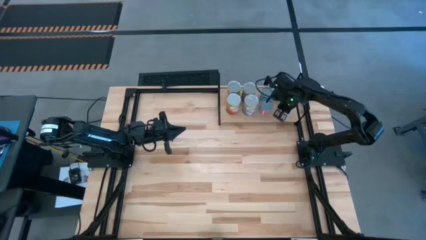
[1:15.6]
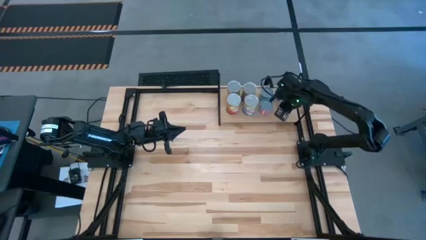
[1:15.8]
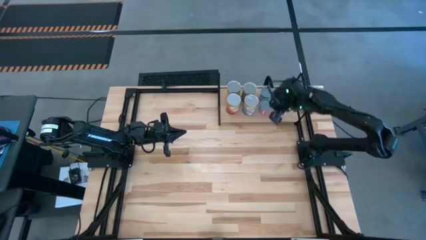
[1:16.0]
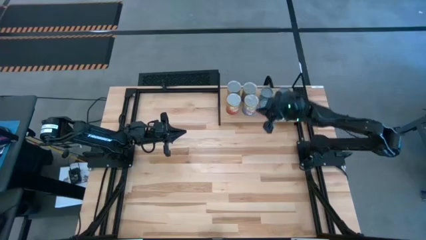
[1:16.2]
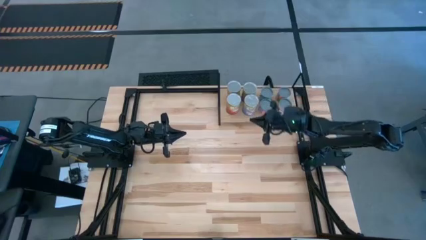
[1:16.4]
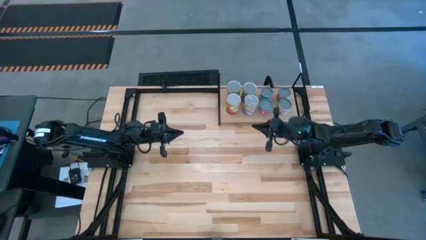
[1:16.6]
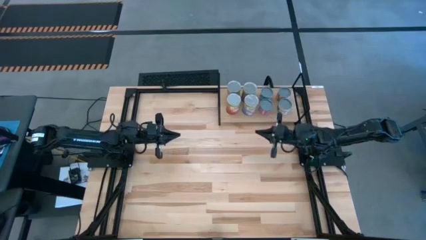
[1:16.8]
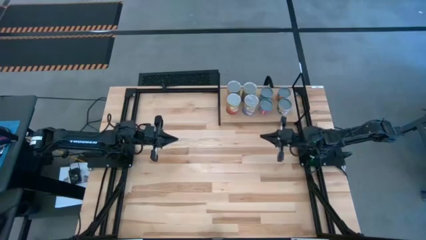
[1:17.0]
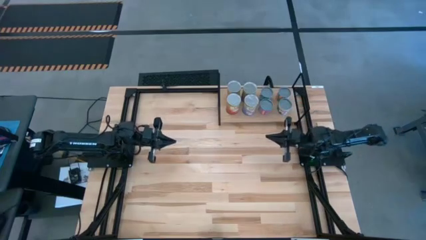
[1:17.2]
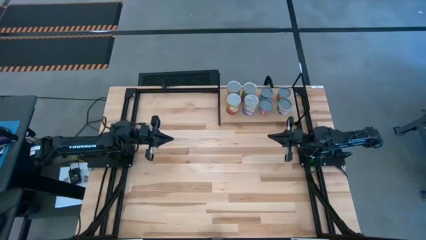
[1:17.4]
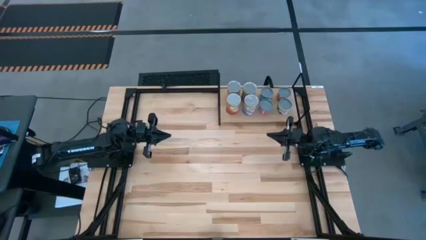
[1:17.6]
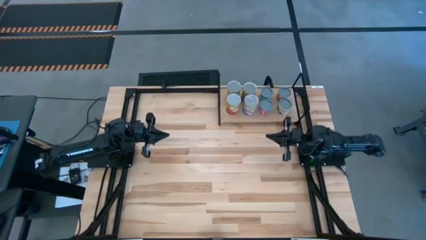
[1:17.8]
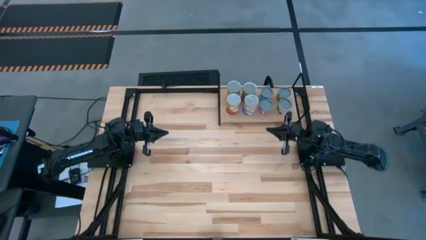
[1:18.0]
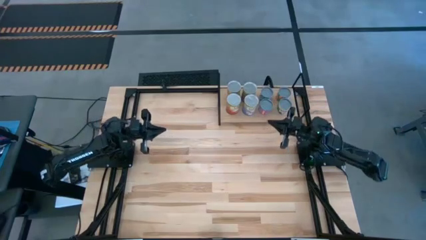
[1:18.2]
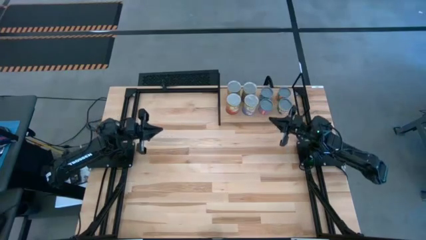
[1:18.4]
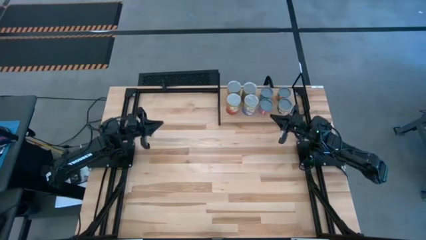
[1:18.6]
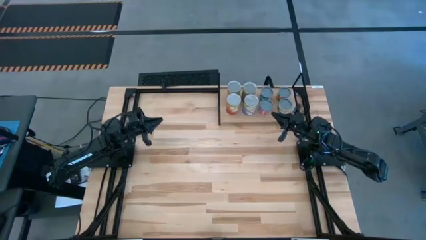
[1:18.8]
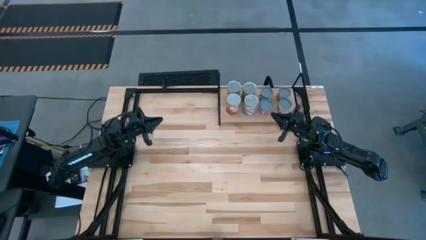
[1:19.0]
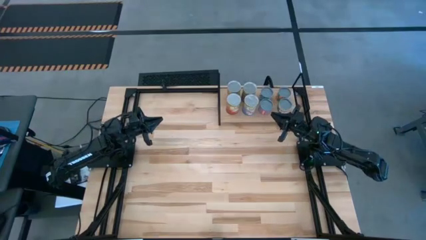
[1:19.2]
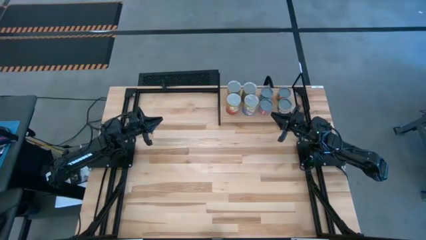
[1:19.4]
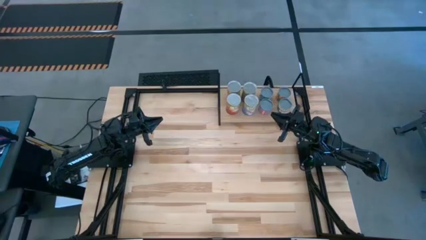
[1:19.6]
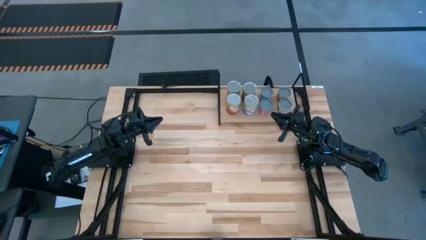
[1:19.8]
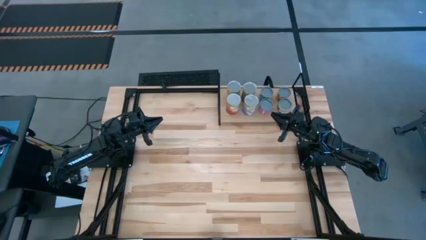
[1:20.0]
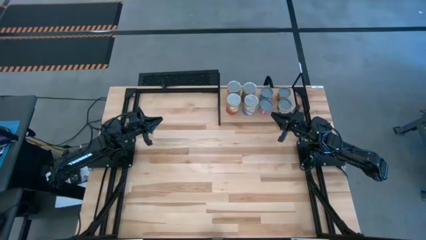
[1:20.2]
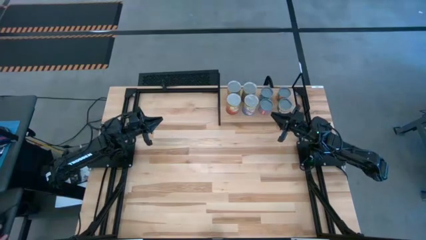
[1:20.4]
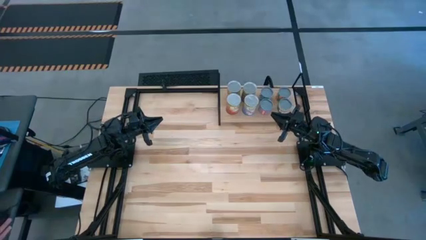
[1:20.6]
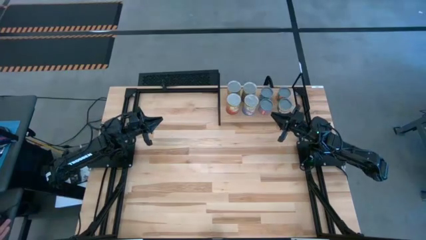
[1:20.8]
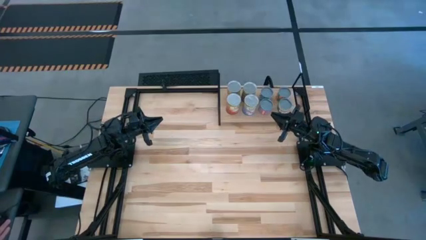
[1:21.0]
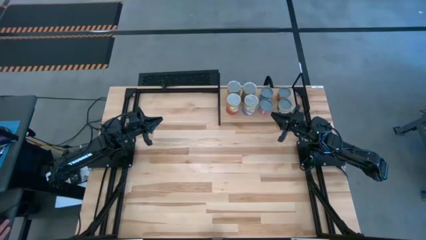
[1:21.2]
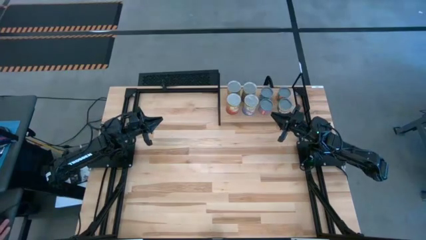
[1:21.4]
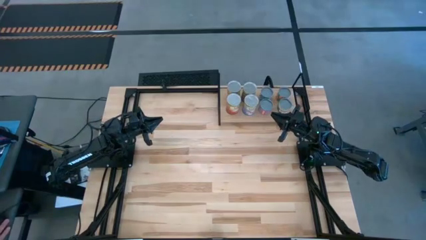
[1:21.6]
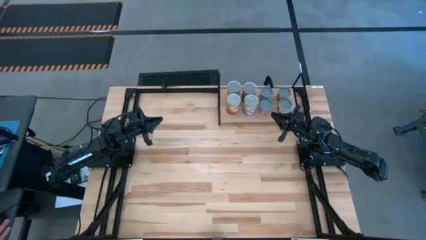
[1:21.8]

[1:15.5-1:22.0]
Task: Pick and place cans onto a shelf
Return to Home Position

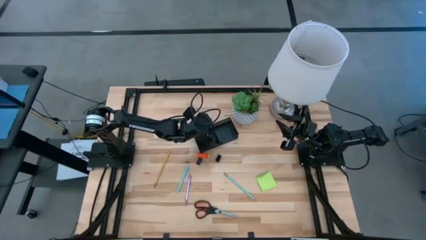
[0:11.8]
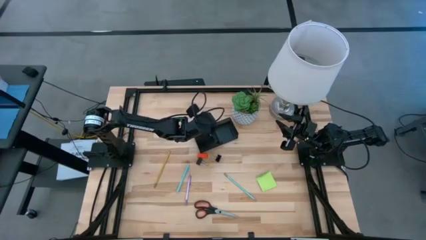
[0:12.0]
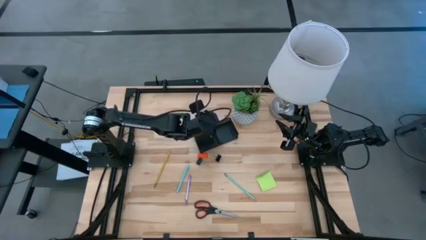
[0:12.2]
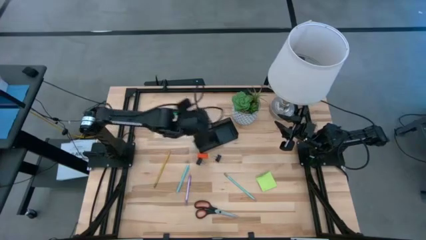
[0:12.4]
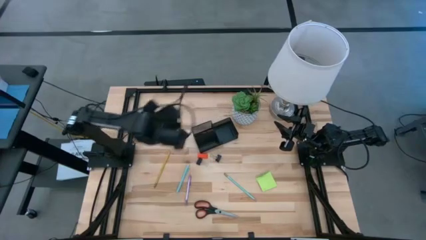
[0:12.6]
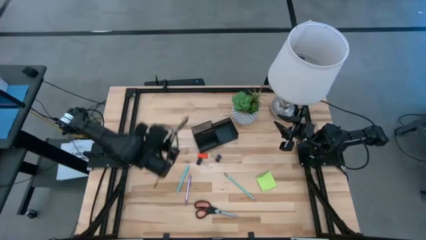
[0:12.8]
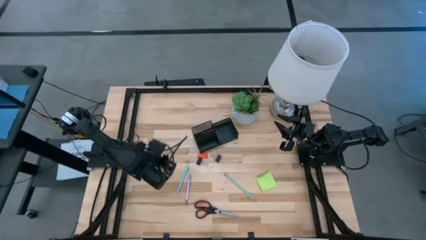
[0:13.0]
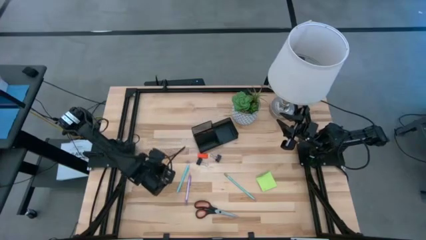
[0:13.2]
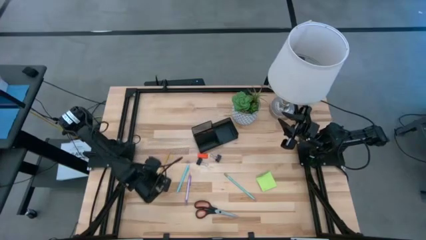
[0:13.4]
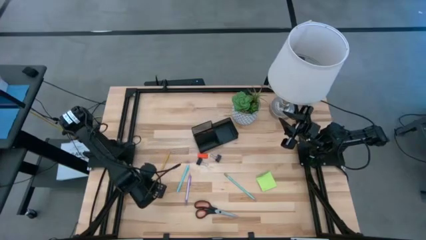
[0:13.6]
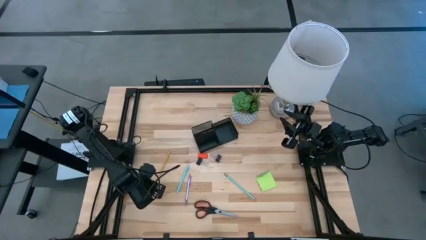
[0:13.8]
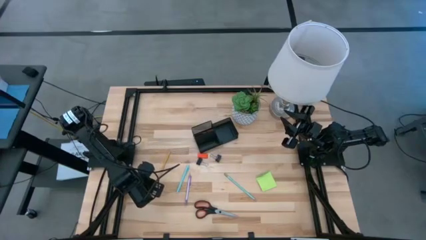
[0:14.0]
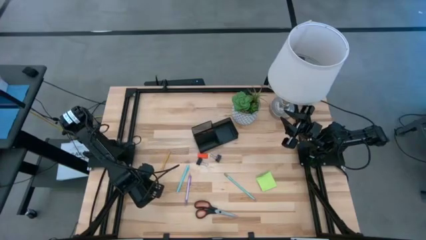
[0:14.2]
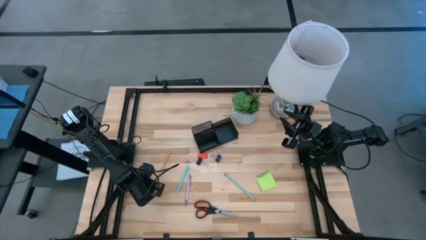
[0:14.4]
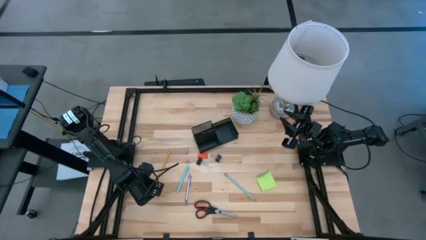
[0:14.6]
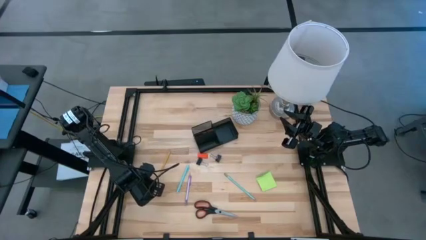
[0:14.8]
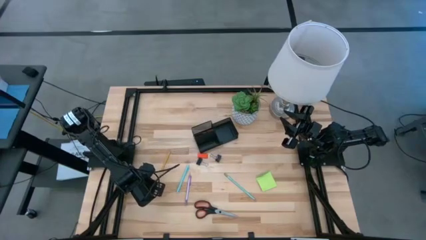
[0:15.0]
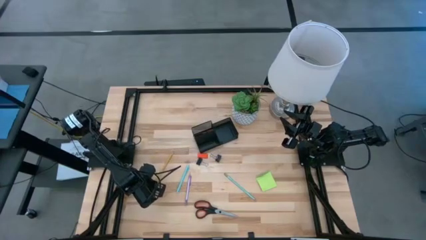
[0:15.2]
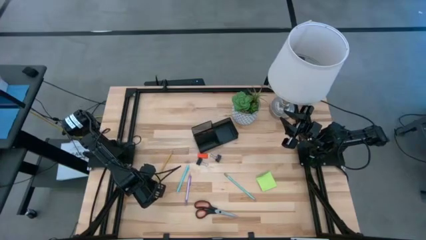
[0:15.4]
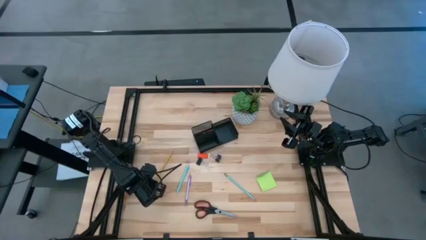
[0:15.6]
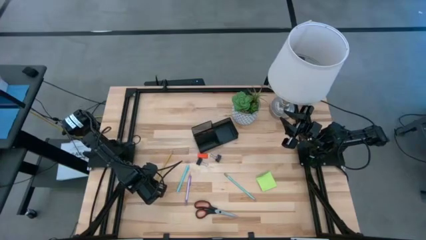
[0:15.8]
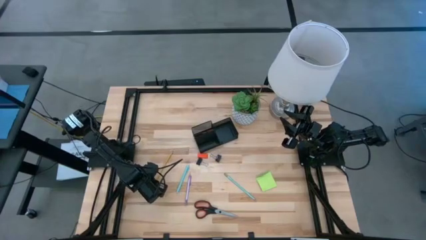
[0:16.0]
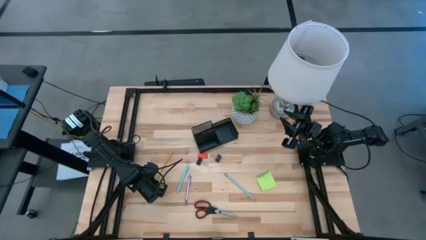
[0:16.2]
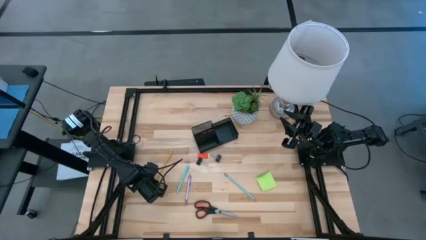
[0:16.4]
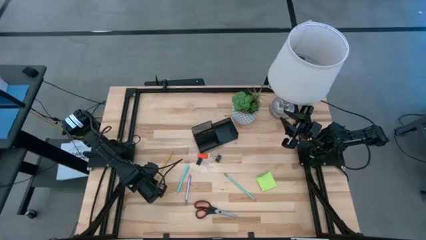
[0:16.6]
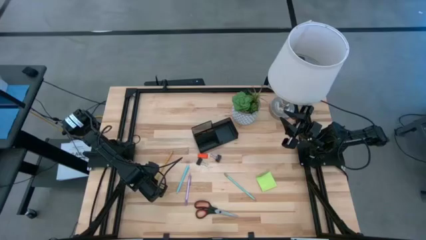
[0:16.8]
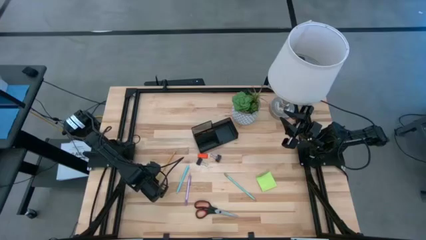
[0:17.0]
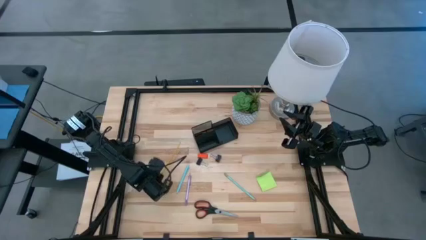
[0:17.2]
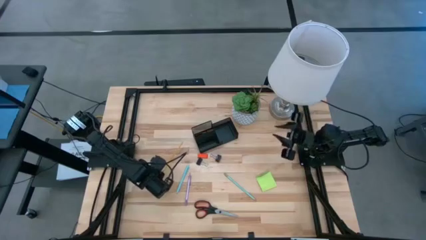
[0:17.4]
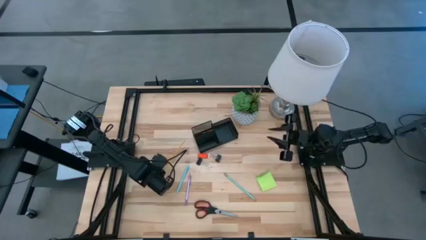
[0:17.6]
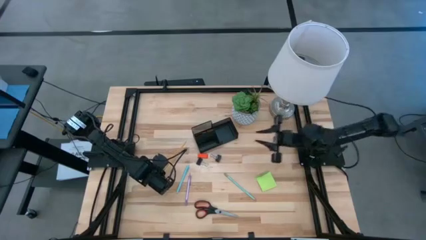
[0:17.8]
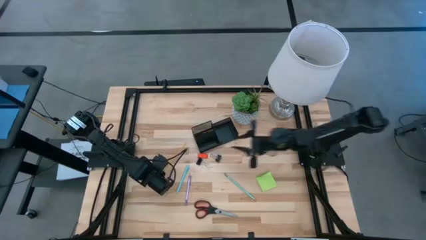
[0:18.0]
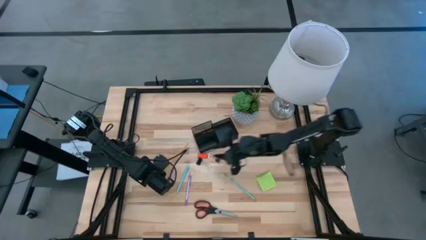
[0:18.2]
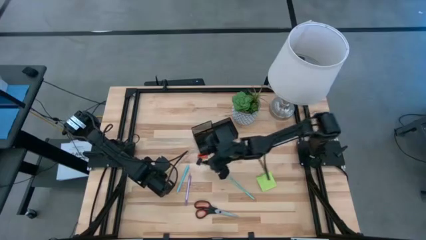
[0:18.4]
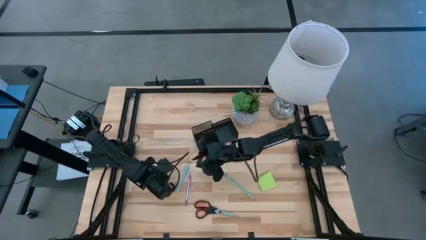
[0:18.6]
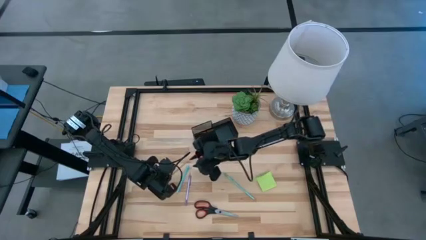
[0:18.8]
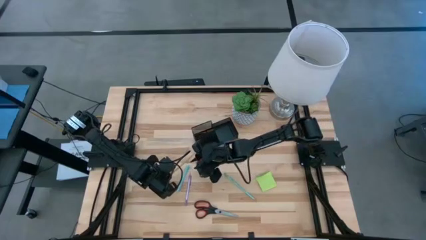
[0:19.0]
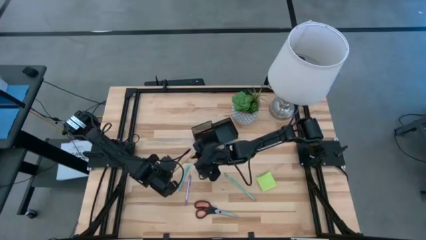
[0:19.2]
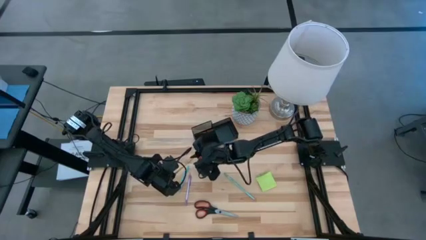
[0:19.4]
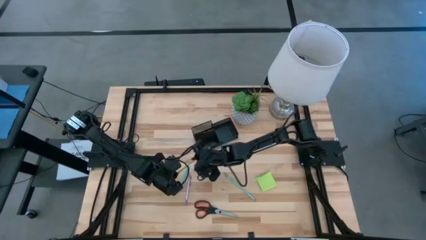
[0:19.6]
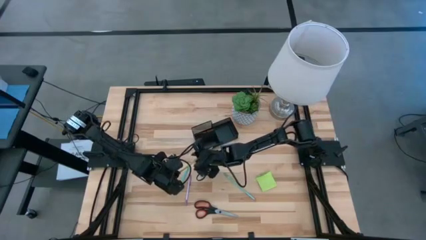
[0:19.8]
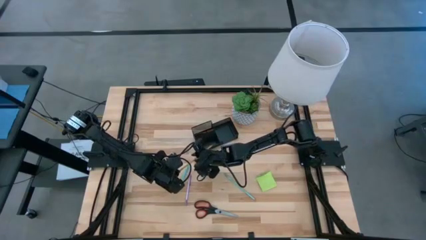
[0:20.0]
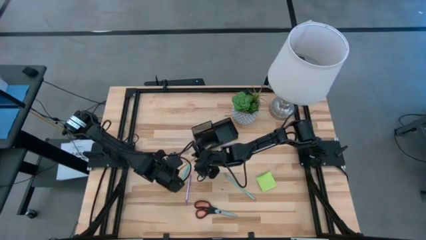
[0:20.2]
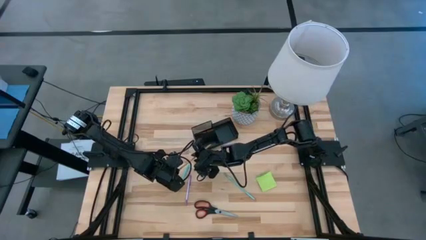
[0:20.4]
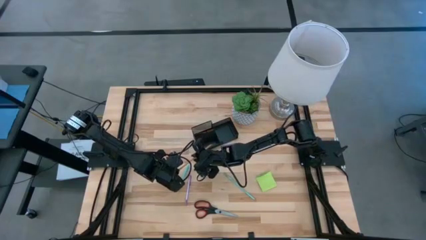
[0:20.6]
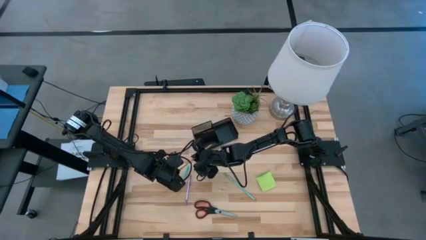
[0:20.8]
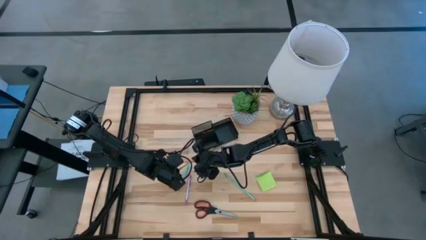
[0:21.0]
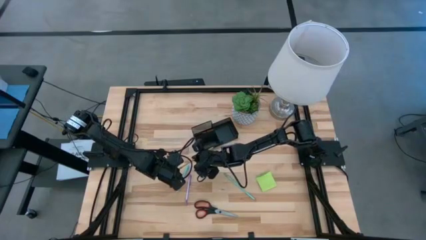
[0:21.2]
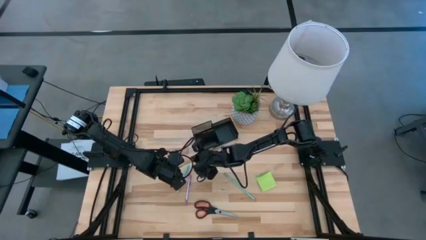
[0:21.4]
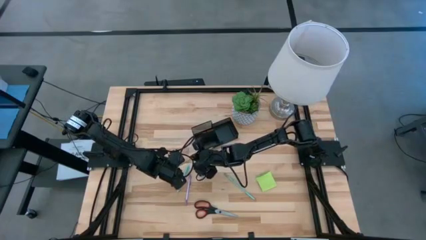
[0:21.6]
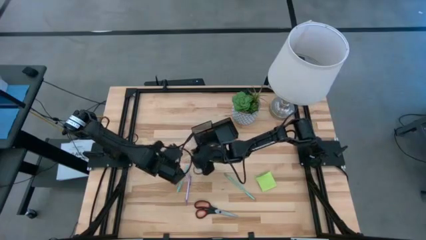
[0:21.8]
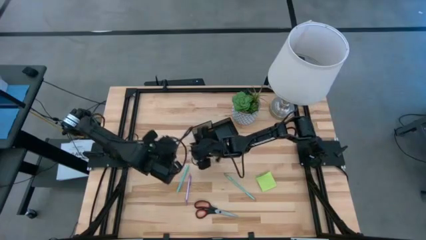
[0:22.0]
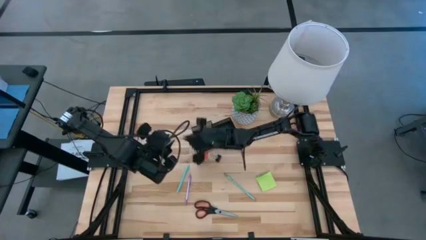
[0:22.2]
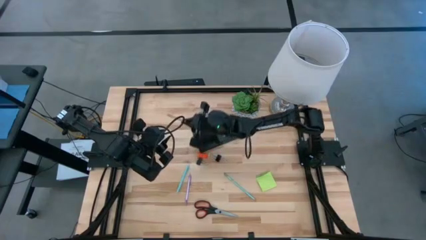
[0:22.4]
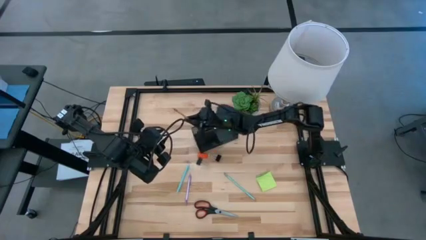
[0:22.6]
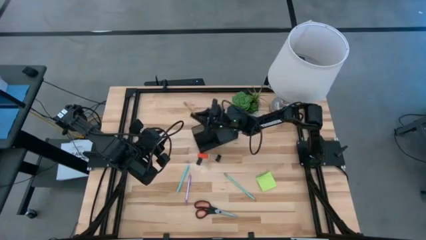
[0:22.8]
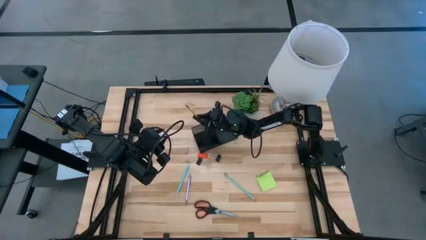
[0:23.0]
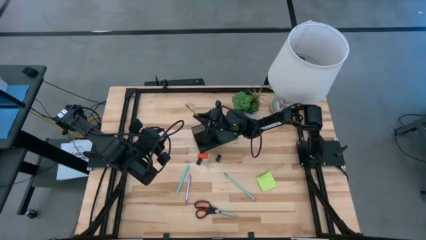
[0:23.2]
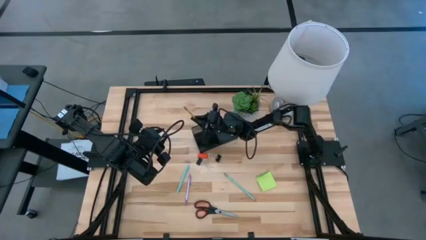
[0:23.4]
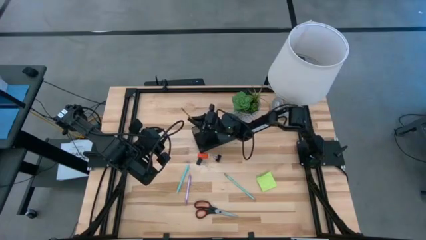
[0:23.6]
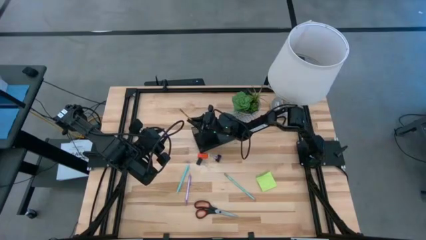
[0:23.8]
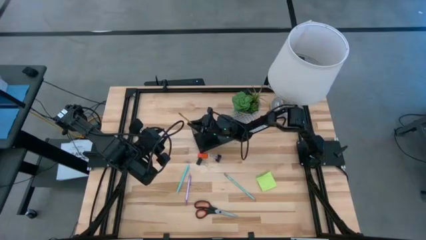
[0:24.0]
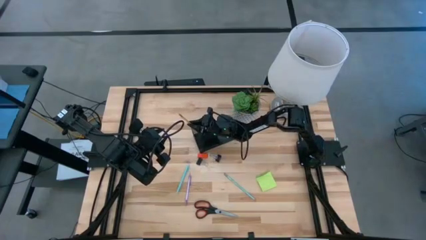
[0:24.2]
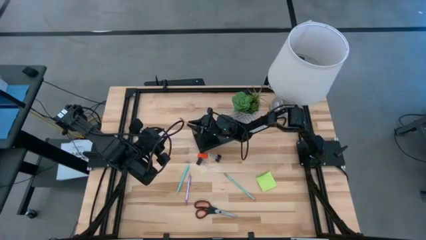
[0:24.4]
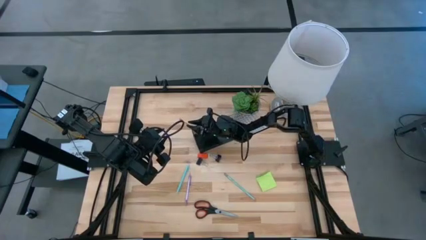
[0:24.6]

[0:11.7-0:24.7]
Task: Pick and place office supplies into organizer
Put the yellow pencil into the black desk organizer
